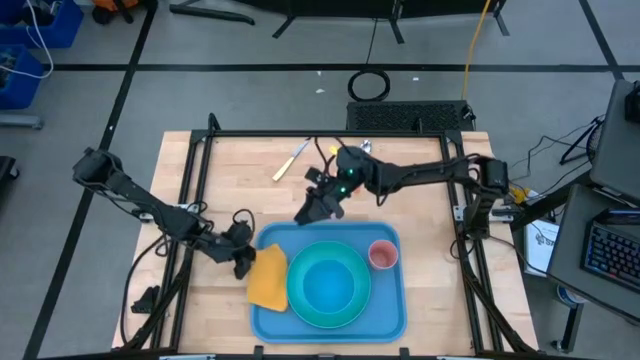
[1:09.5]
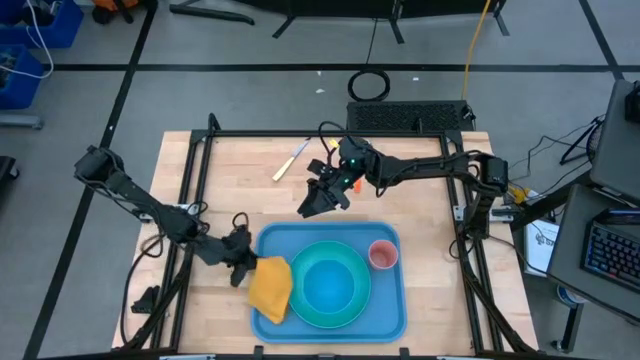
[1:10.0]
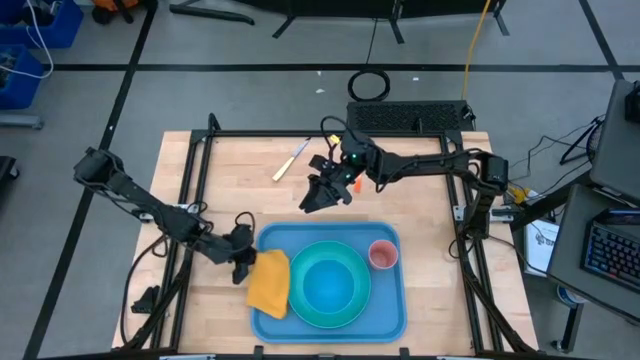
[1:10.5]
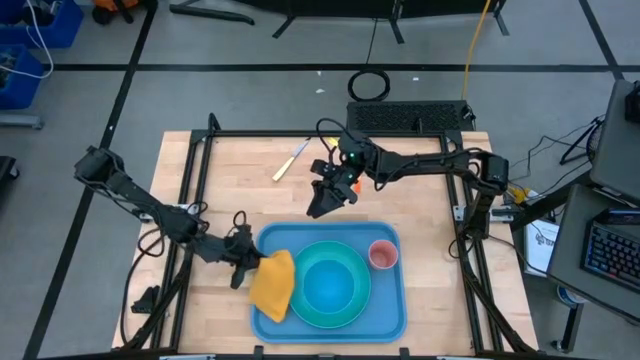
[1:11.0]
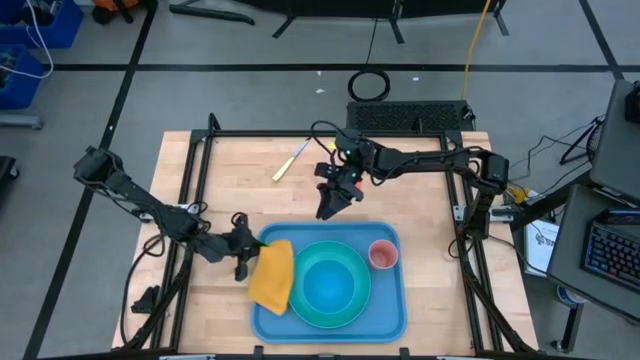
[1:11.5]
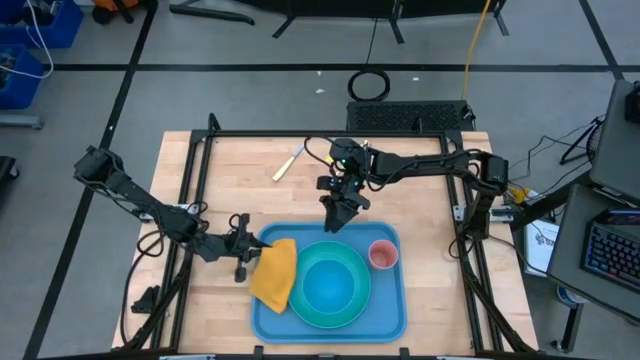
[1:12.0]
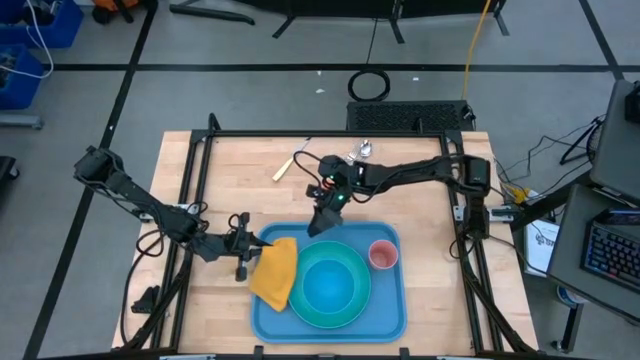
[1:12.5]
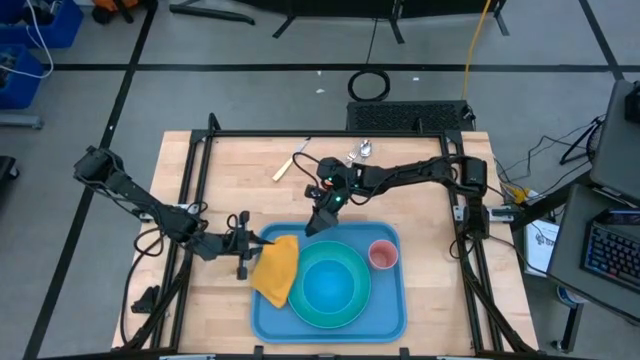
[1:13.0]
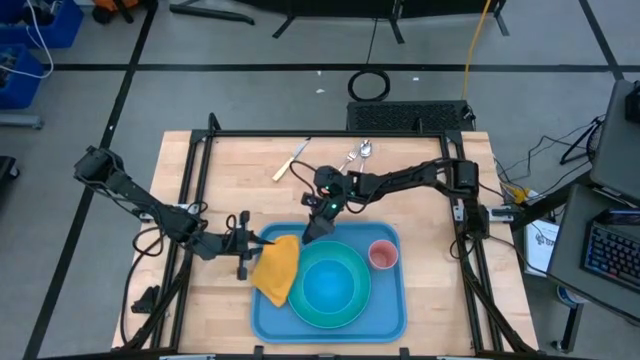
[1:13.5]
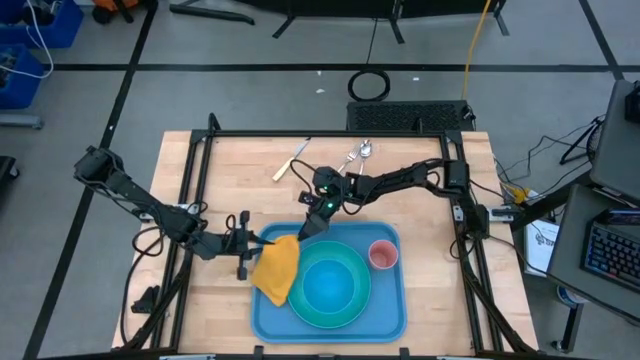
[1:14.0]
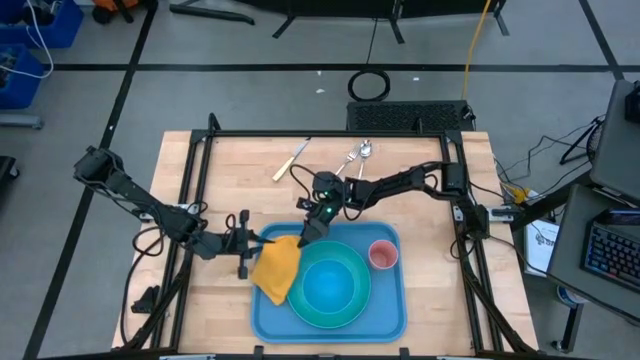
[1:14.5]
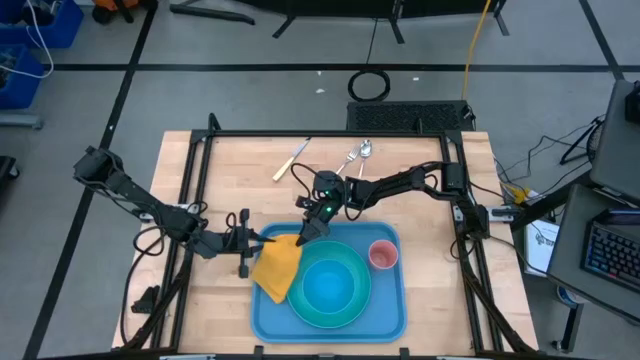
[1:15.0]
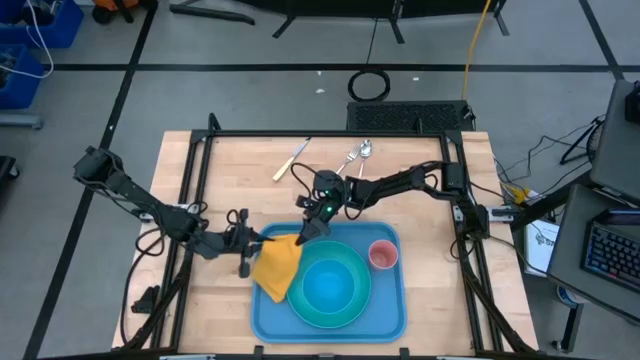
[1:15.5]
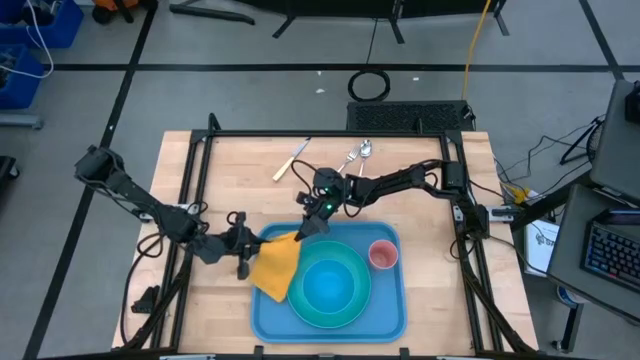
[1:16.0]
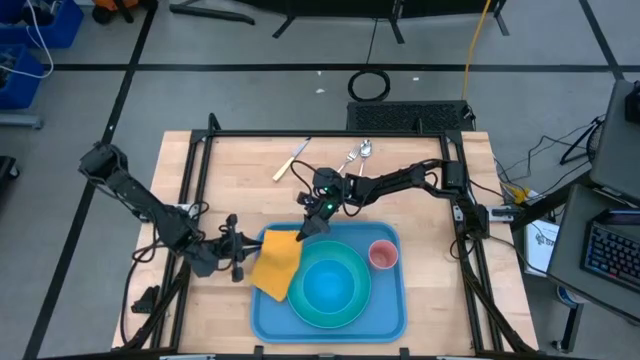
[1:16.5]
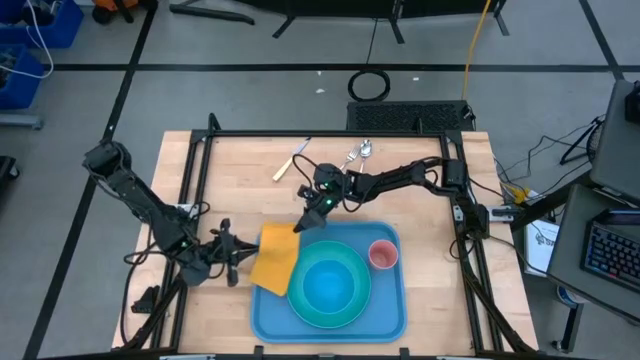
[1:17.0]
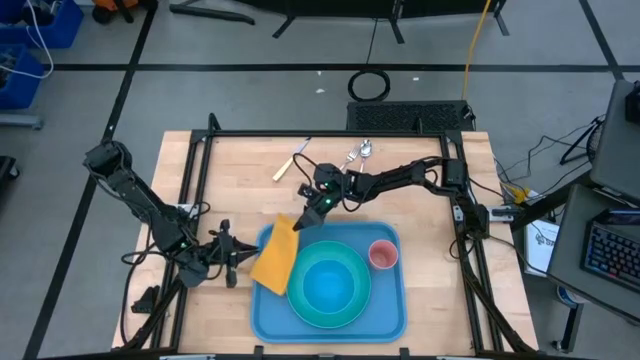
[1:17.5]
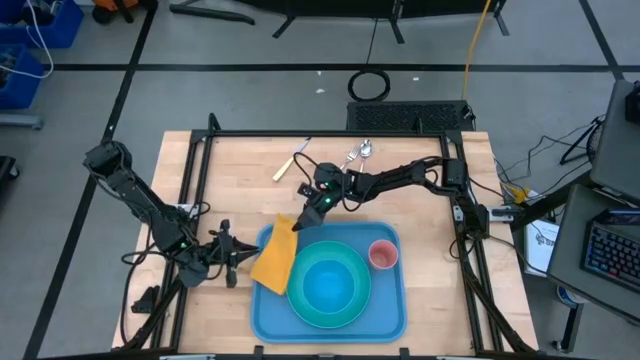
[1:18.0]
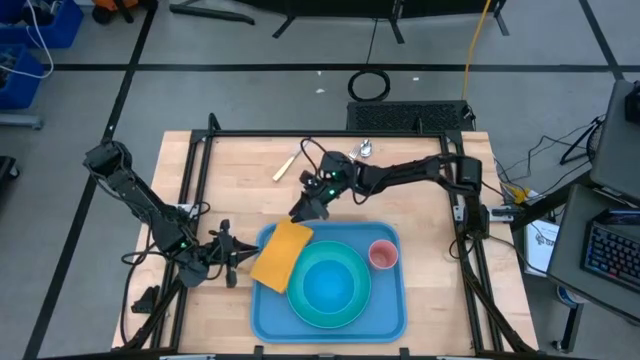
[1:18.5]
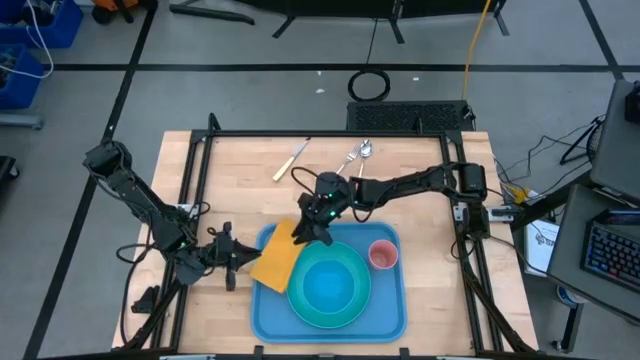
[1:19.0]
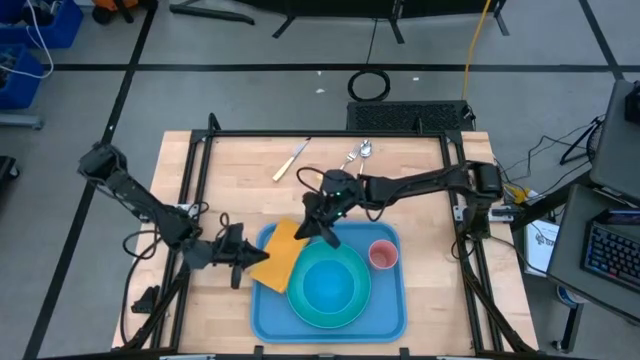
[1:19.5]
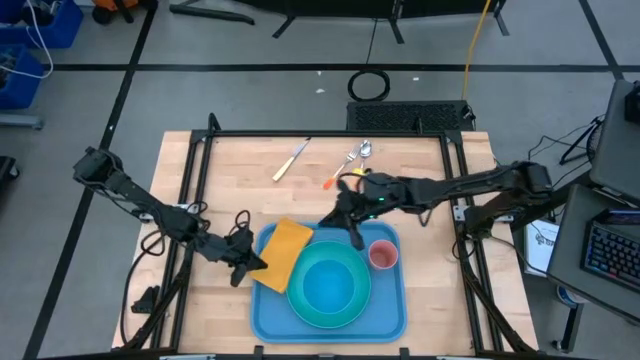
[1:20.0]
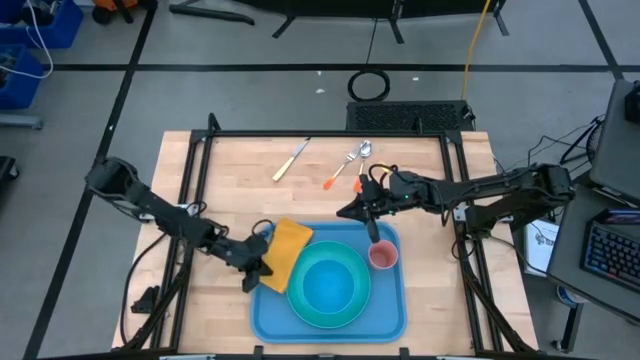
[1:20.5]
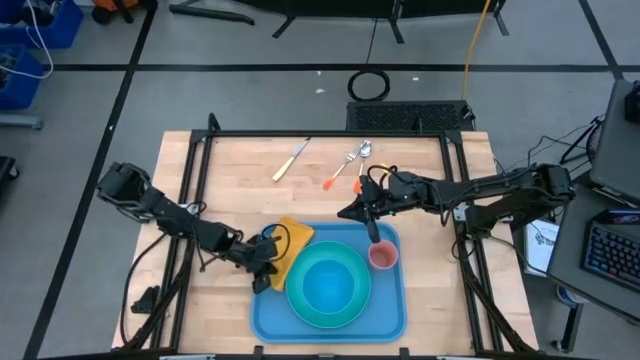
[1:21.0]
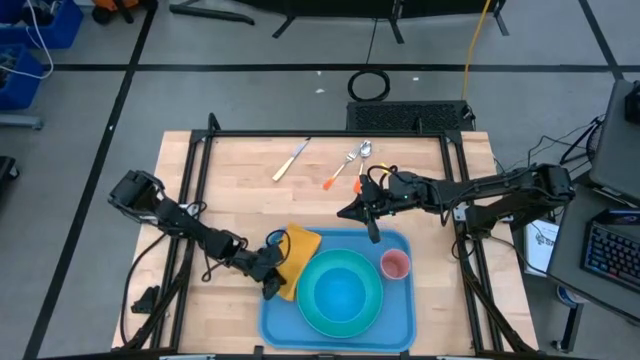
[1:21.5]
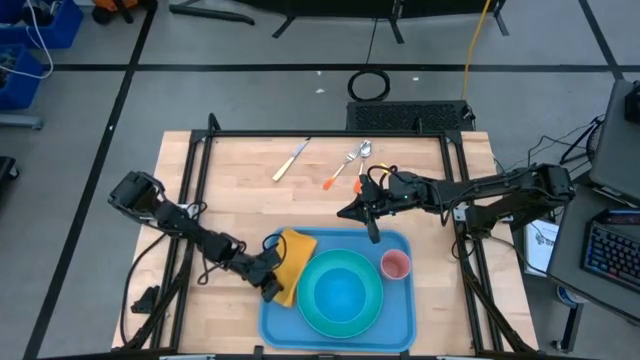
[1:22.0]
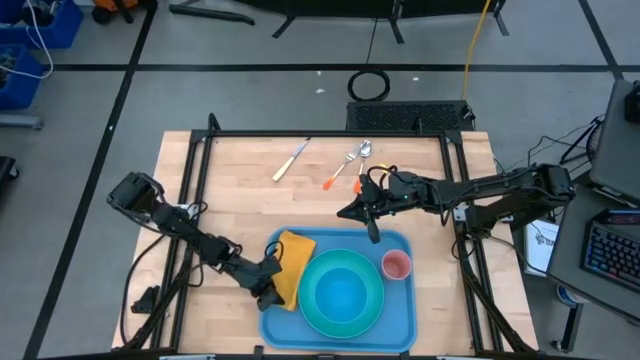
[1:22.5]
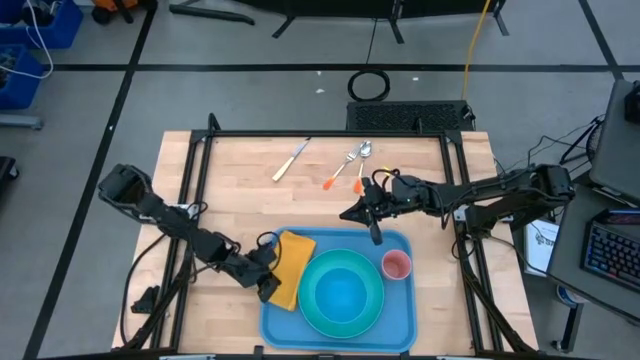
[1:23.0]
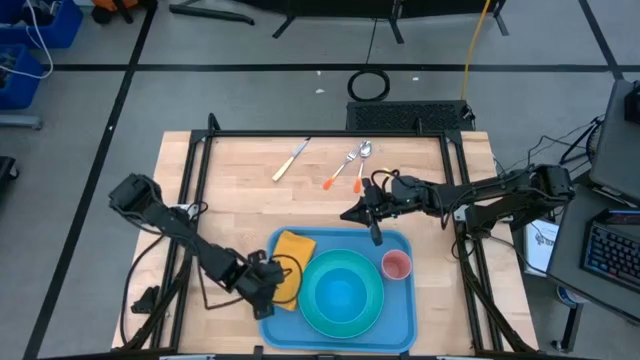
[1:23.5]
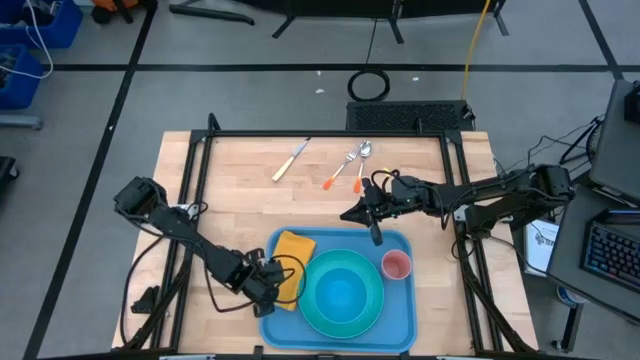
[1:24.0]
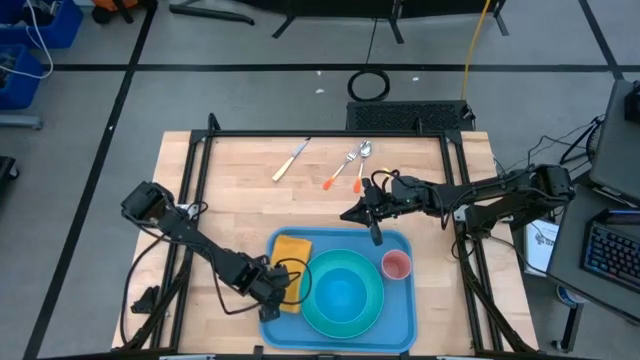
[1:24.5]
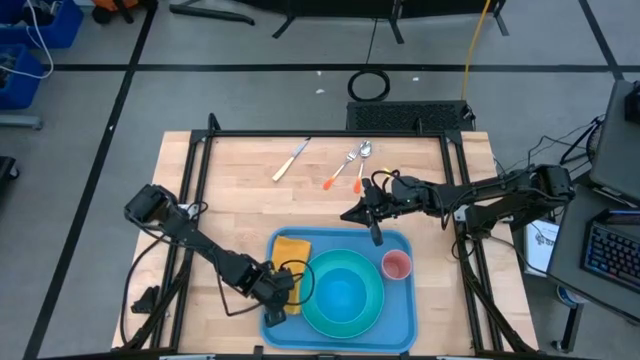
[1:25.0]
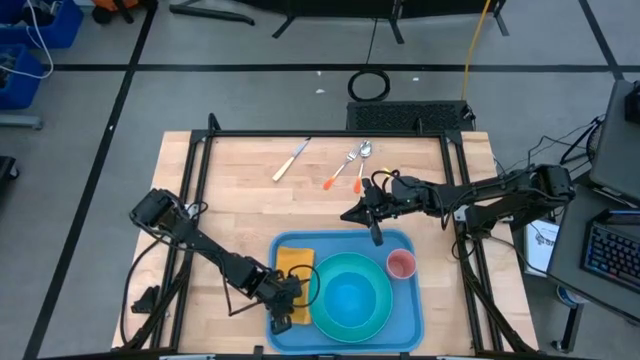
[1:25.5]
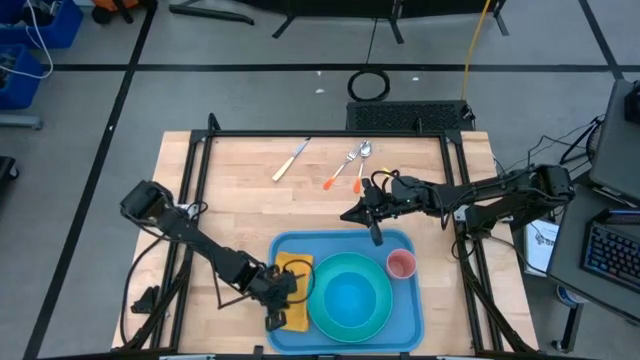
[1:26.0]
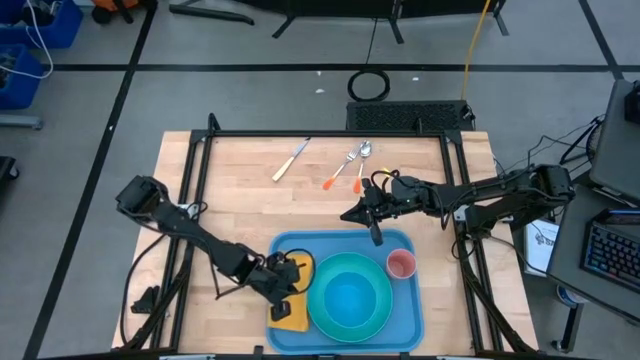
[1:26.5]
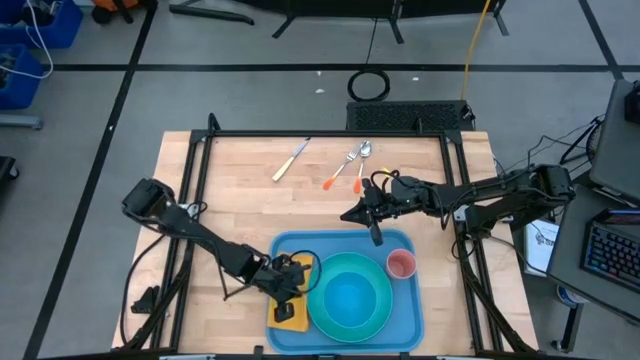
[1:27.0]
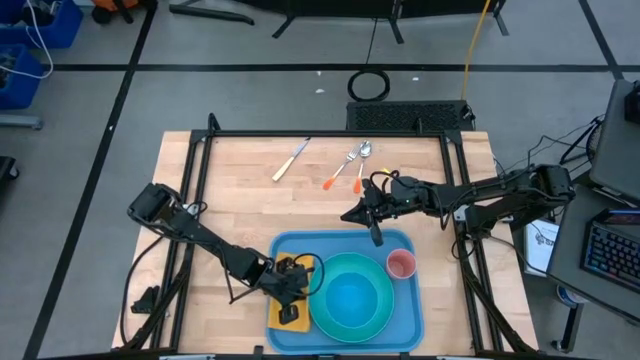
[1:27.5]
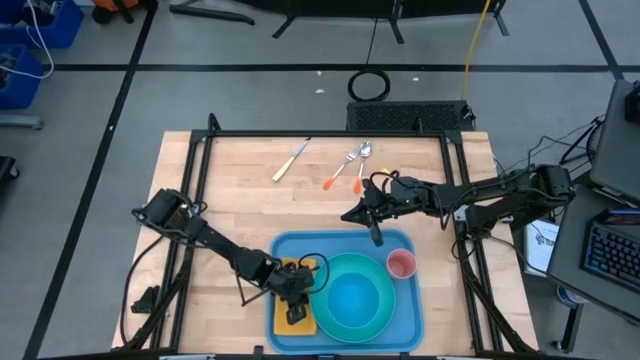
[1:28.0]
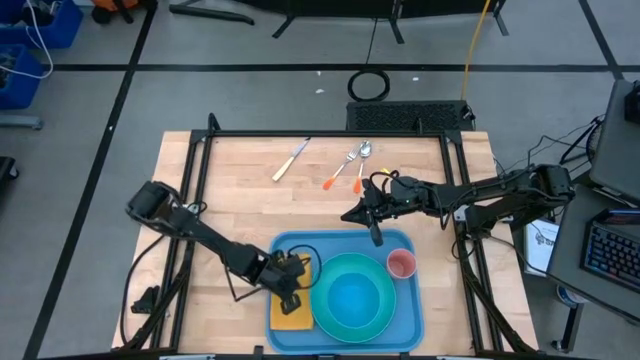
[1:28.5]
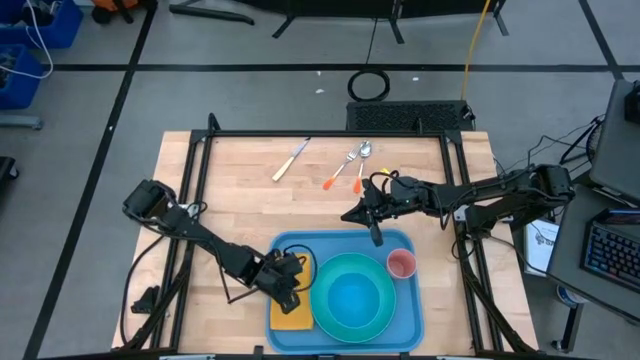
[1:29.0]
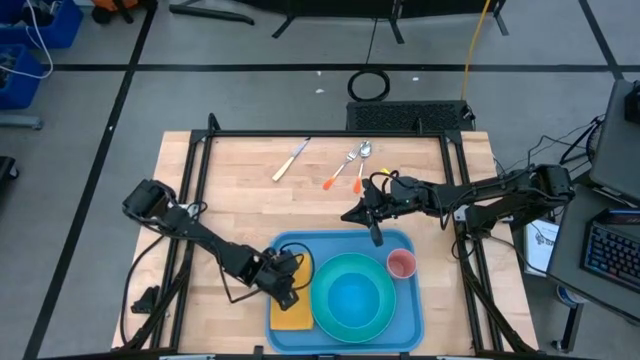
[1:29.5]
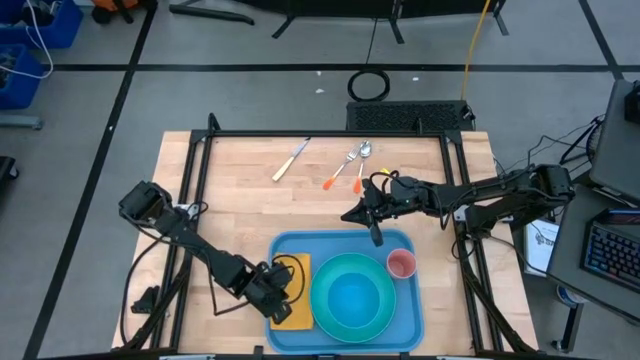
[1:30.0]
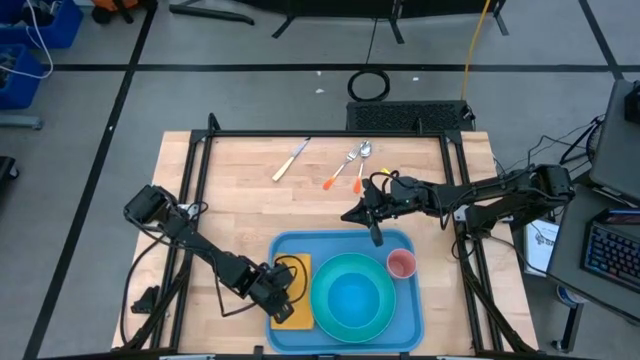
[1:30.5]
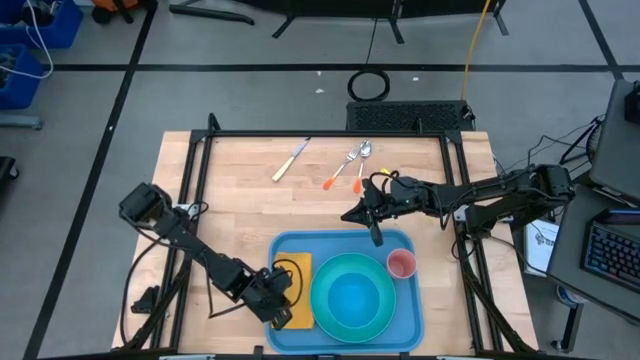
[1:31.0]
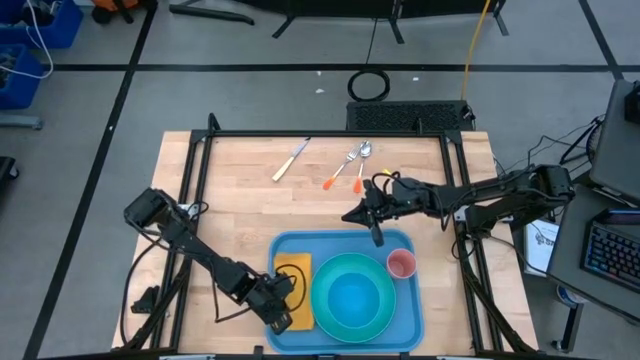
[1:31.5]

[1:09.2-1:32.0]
Task: Set up tray
Put the yellow table napkin on the blue tray to the left of the light blue plate
